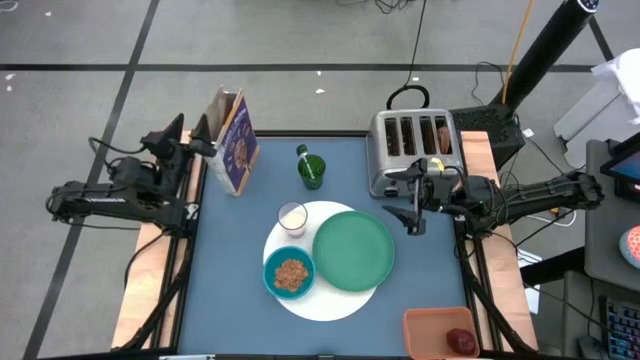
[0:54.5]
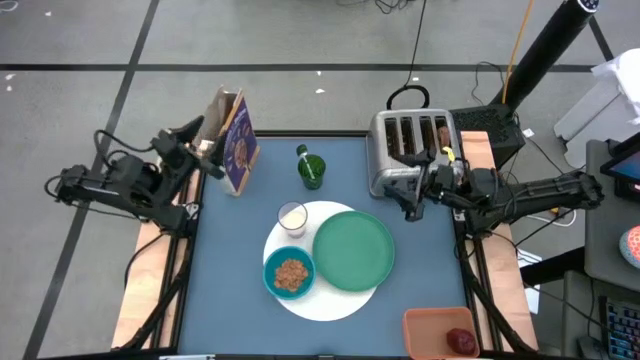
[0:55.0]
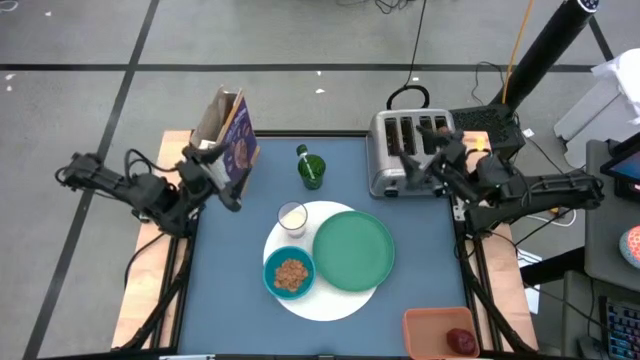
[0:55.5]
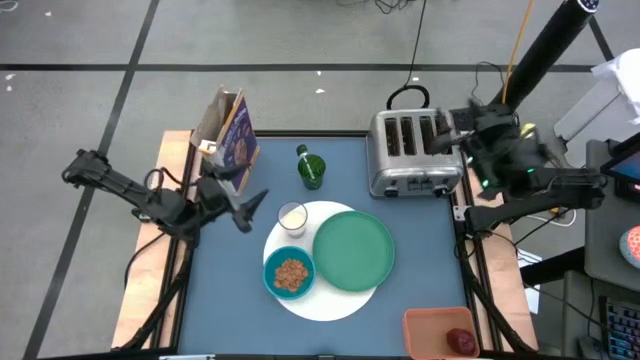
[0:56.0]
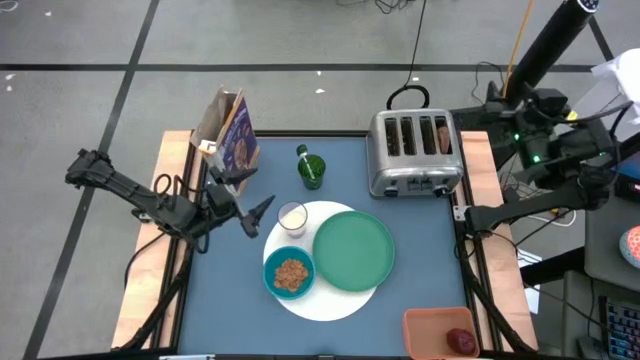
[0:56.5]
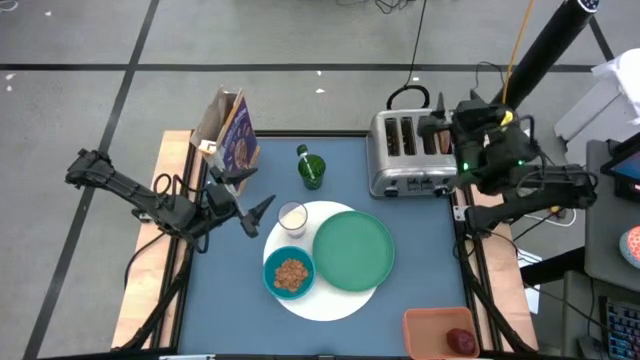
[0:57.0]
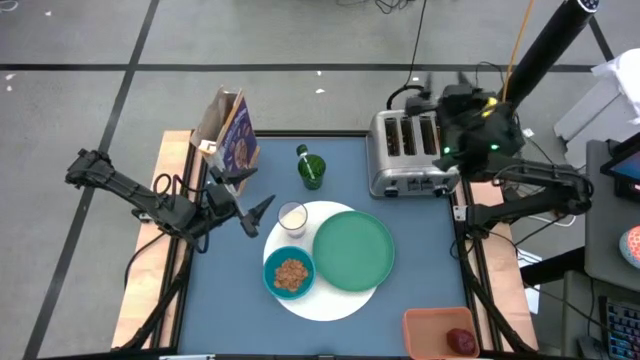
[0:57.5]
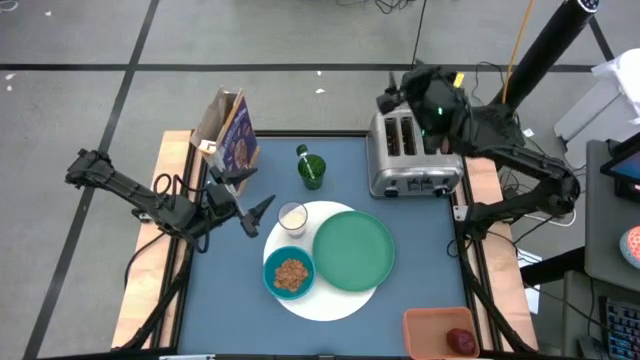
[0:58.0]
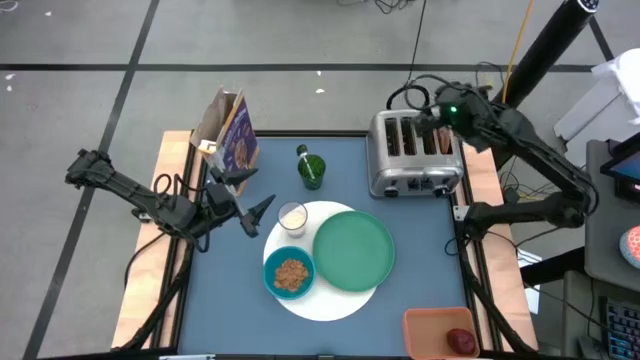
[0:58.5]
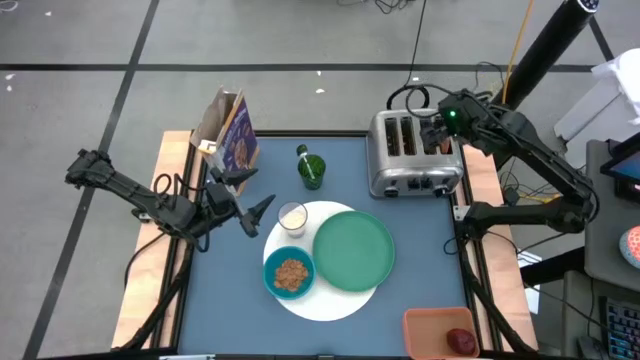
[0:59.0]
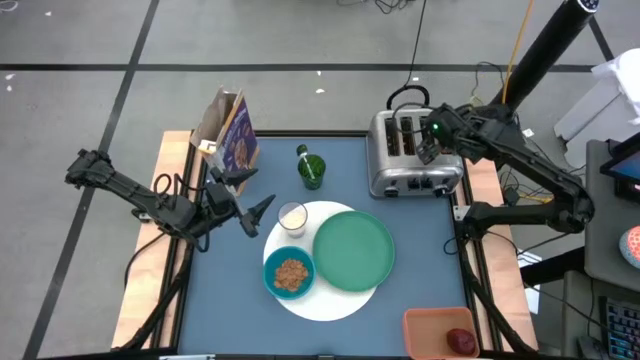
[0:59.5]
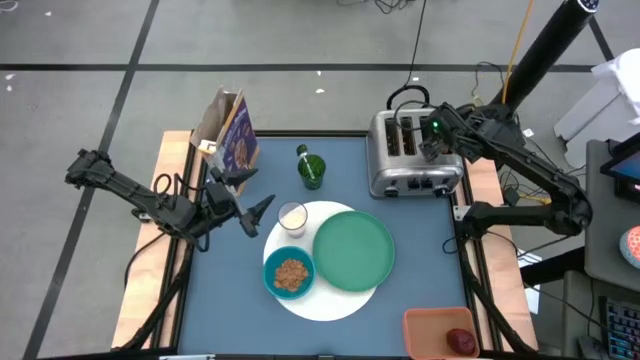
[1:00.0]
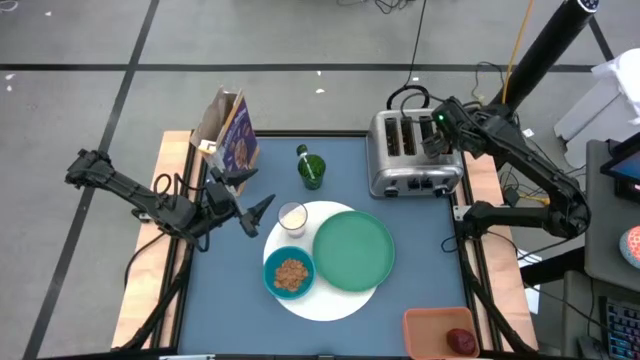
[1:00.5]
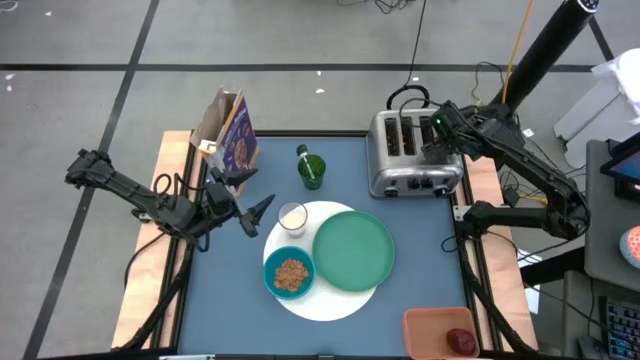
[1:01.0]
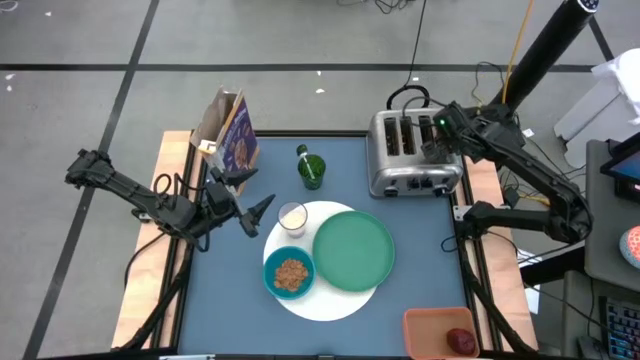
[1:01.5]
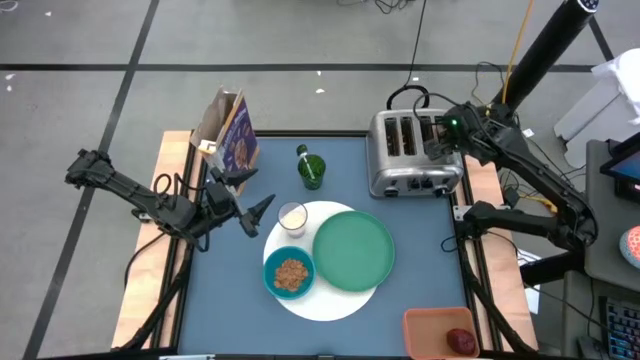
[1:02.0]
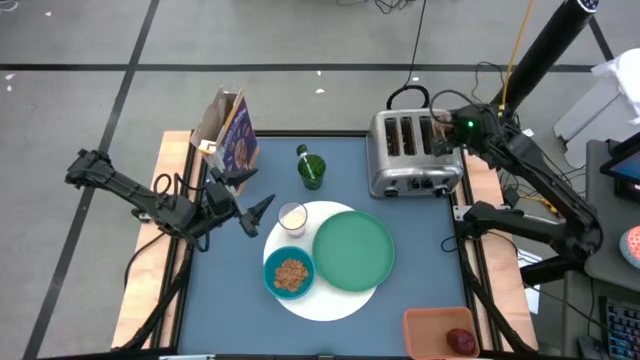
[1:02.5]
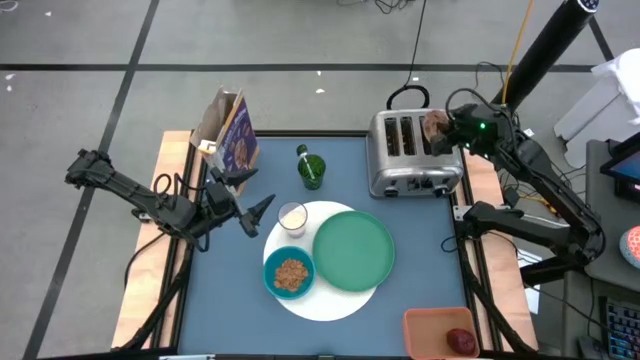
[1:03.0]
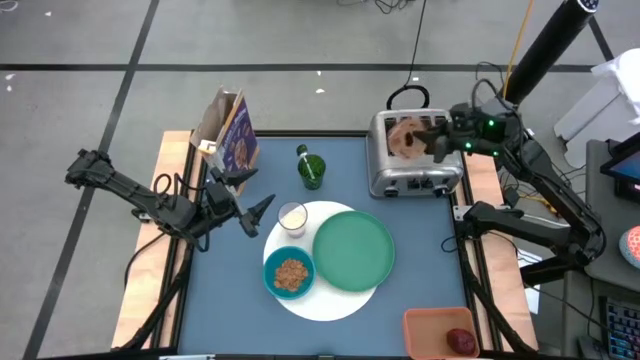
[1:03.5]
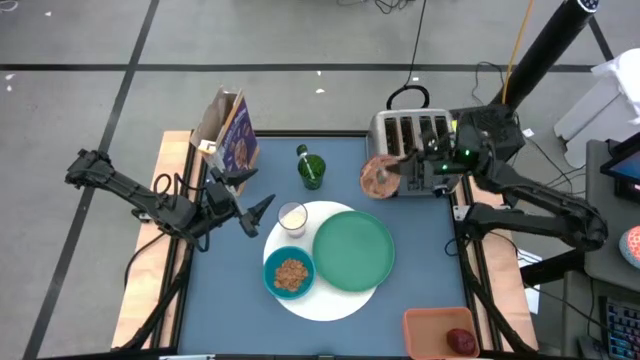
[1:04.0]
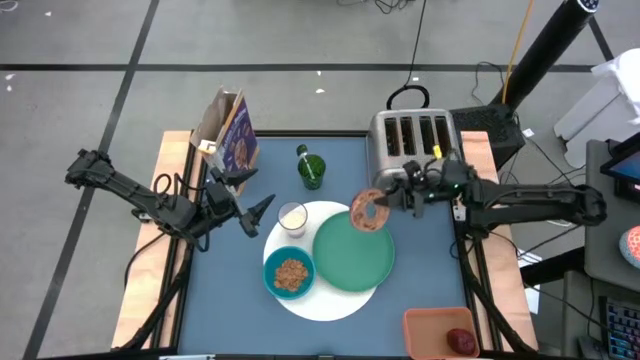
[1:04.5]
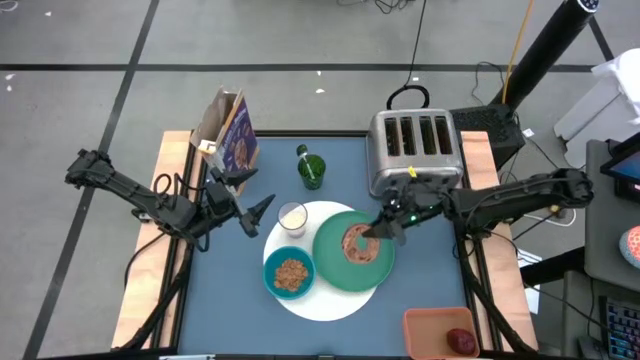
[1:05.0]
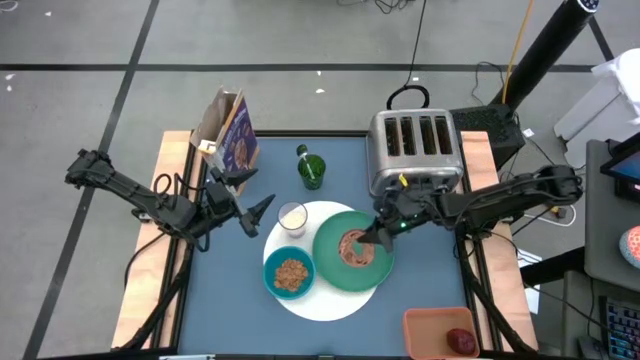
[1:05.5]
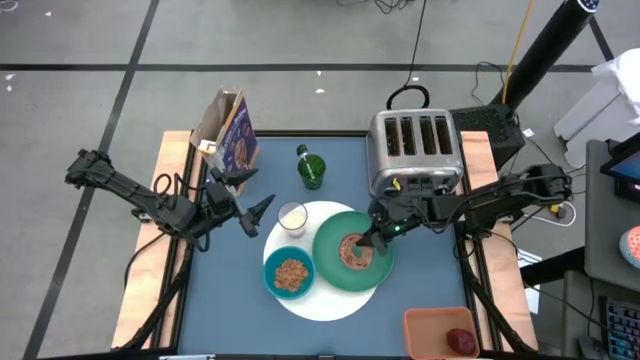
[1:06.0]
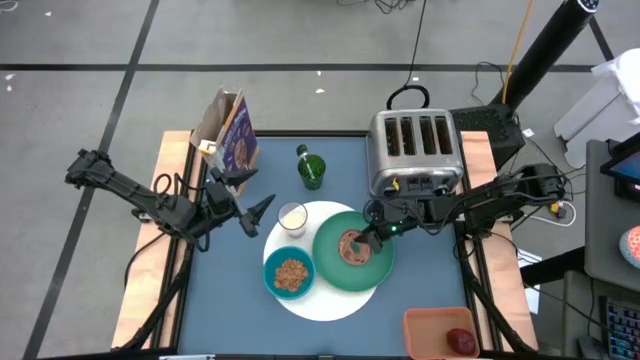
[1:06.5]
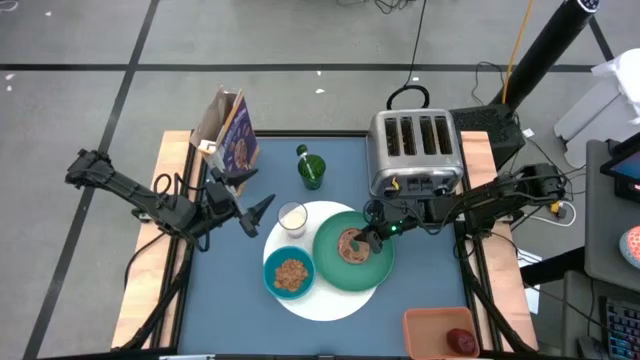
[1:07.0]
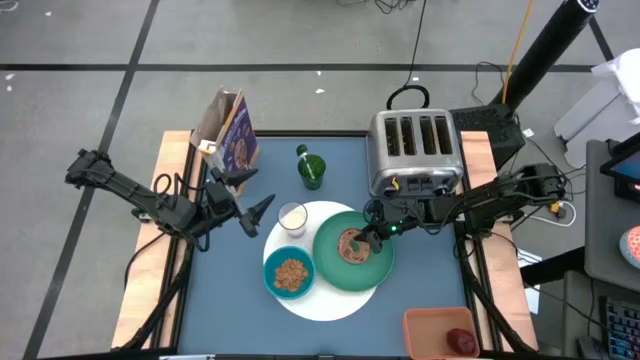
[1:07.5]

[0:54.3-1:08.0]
Task: Arrange a breakfast setting
Put the toasted bagel into the green plate from the toaster

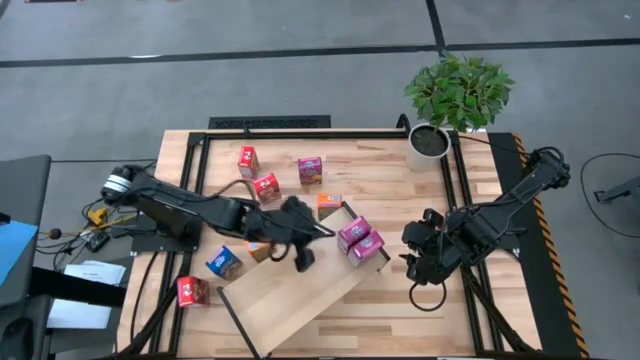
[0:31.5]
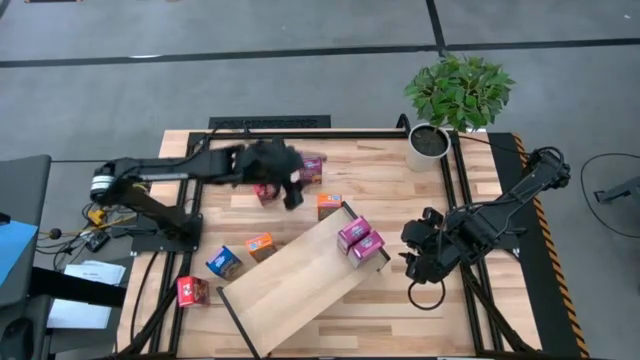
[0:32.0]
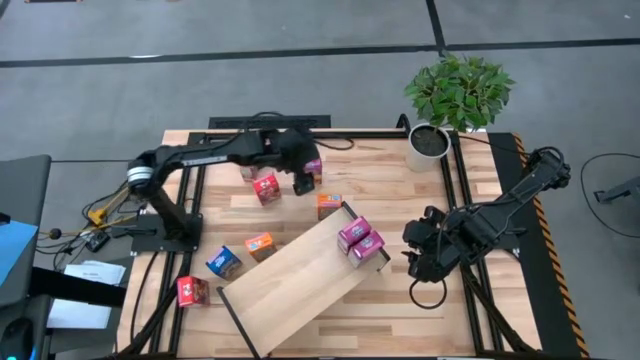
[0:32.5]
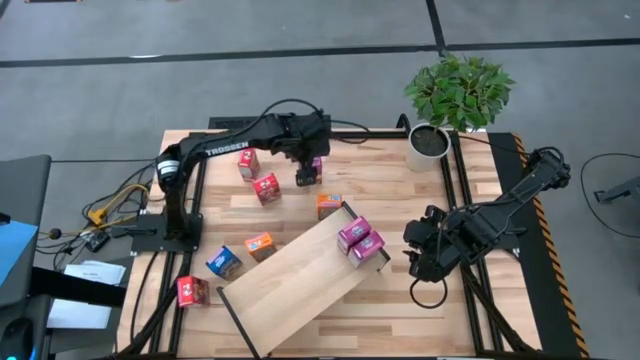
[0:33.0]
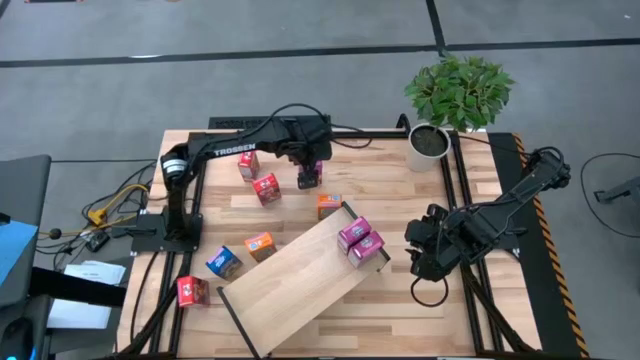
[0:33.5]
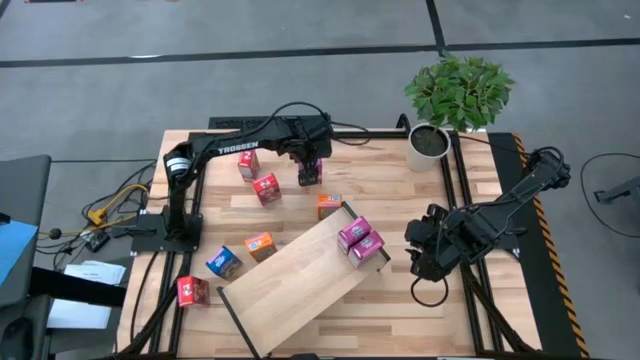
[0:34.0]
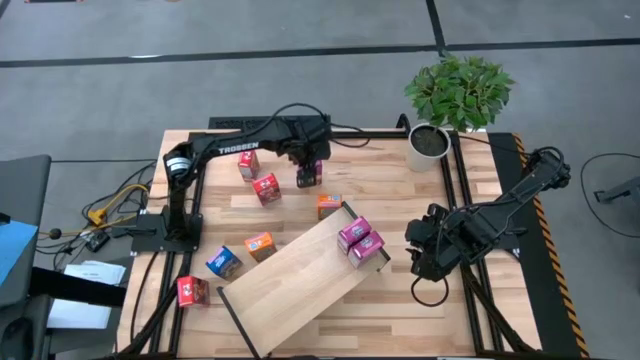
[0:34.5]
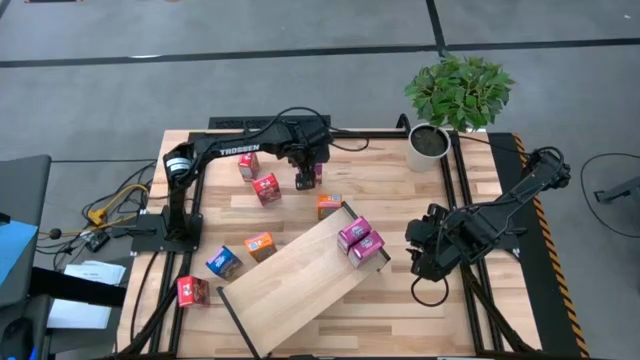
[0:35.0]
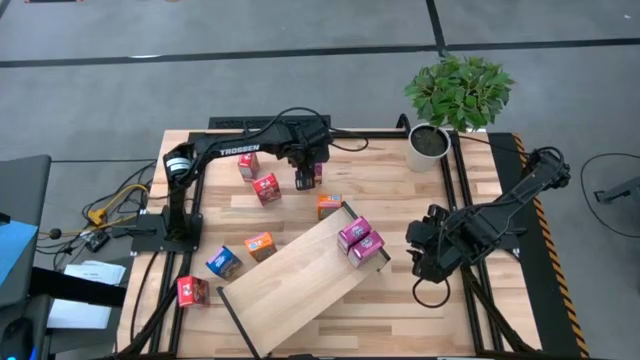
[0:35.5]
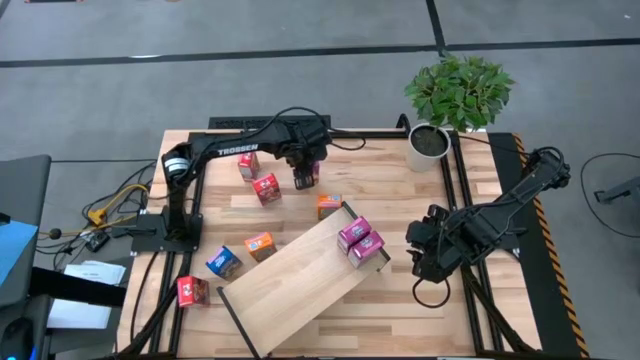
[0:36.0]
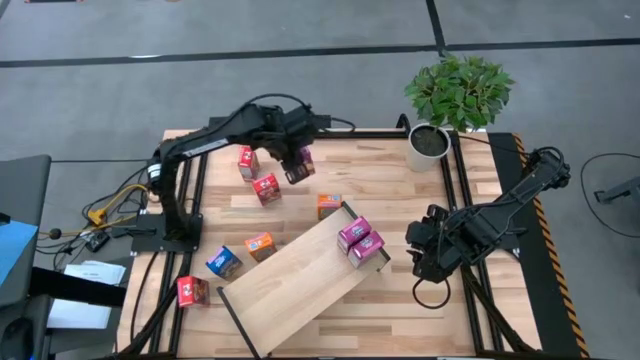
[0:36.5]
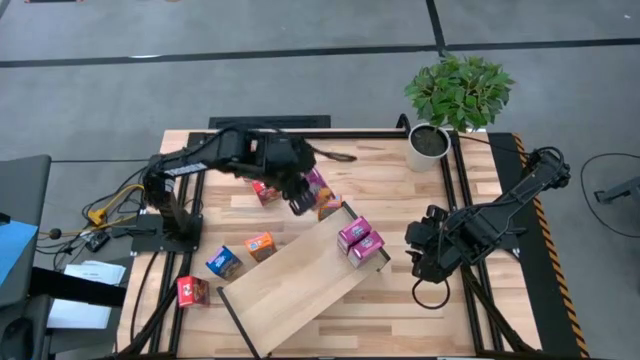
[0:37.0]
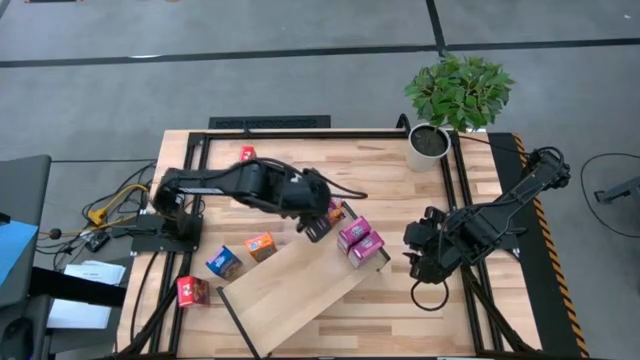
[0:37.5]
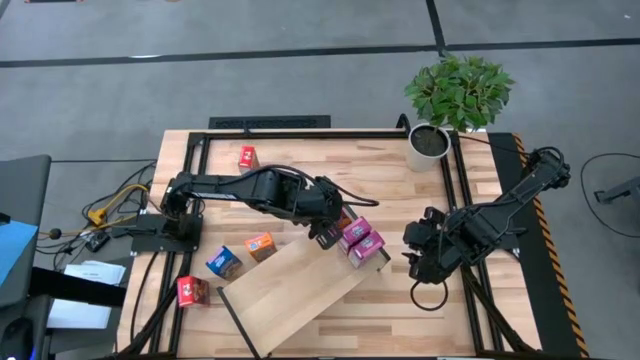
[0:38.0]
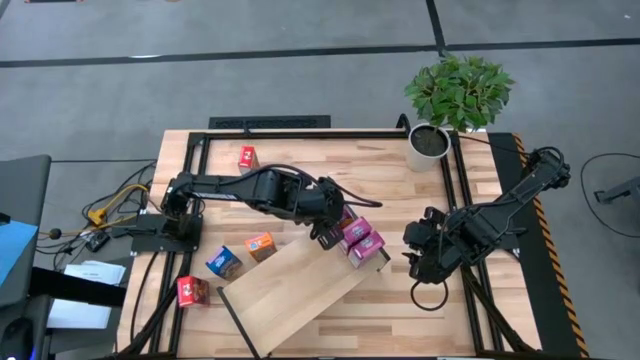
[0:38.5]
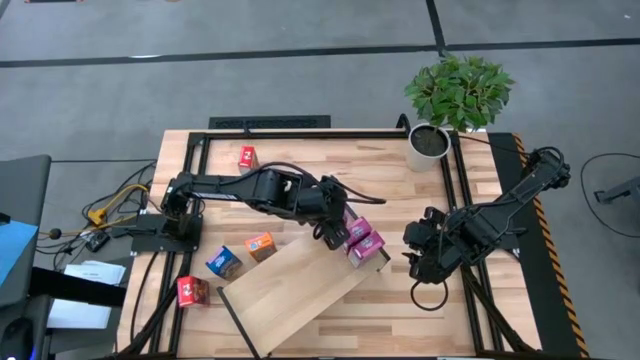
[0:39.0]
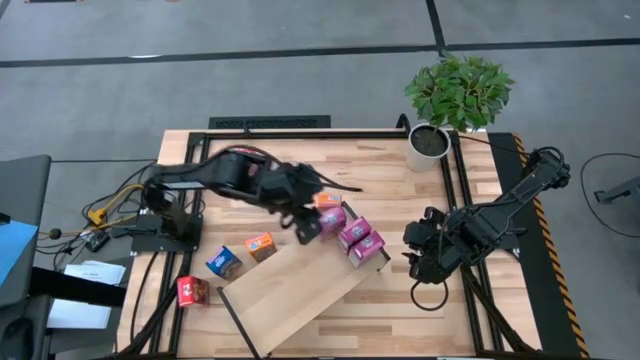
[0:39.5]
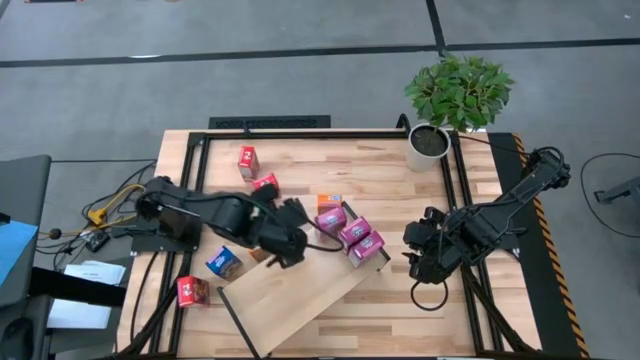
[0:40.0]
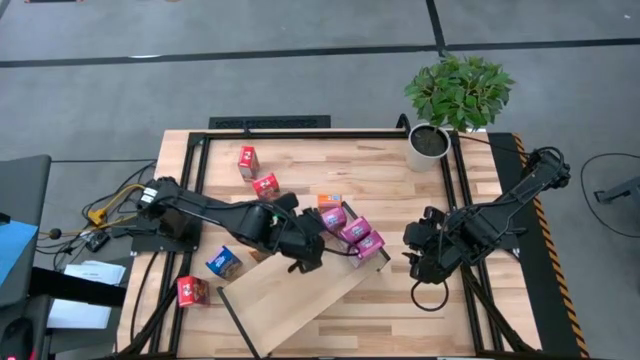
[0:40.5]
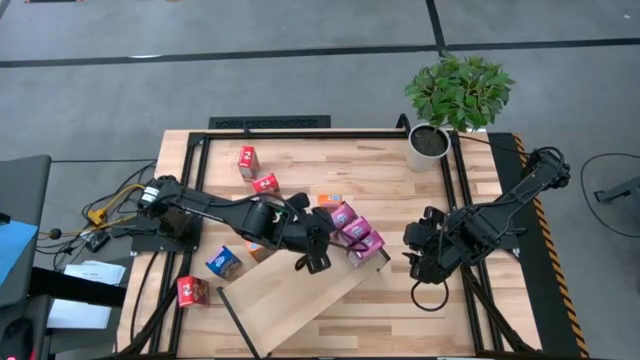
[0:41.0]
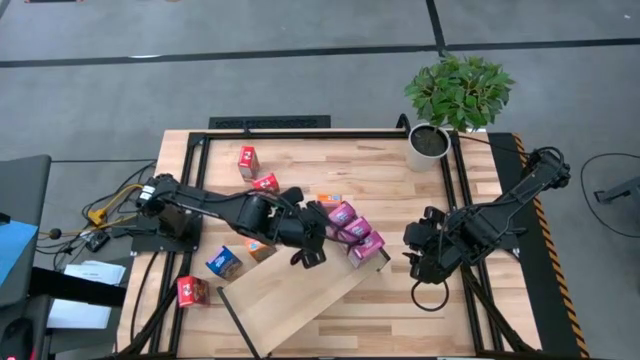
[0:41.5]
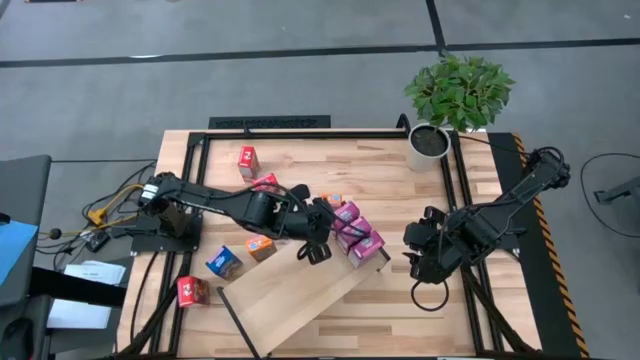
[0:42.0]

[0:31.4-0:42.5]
Task: Stack cereal on shelf
Put the purple cereal box onto the shelf
